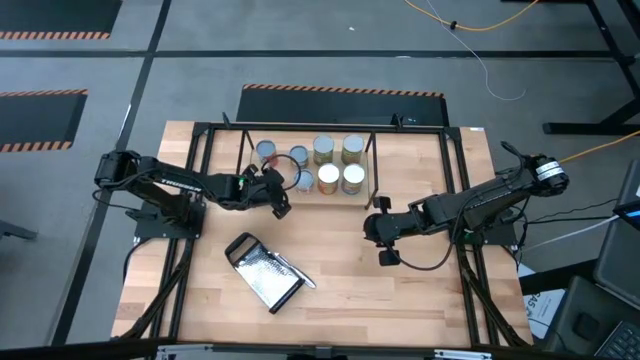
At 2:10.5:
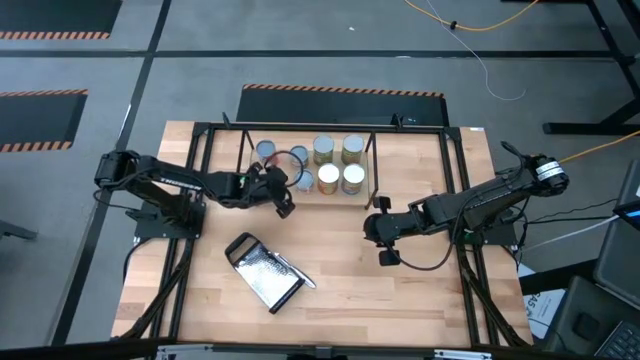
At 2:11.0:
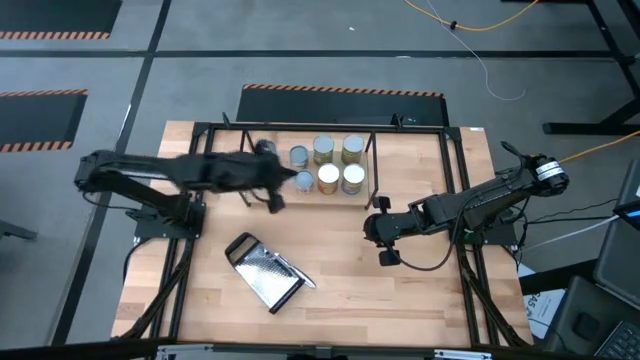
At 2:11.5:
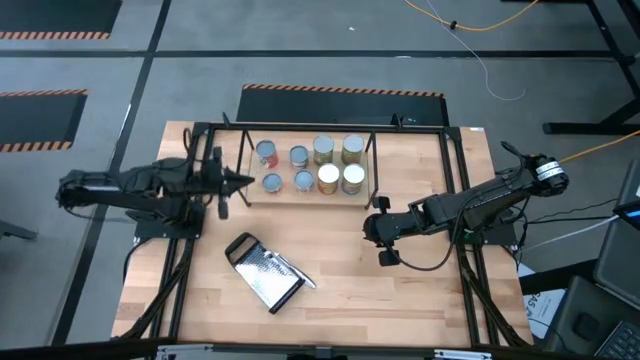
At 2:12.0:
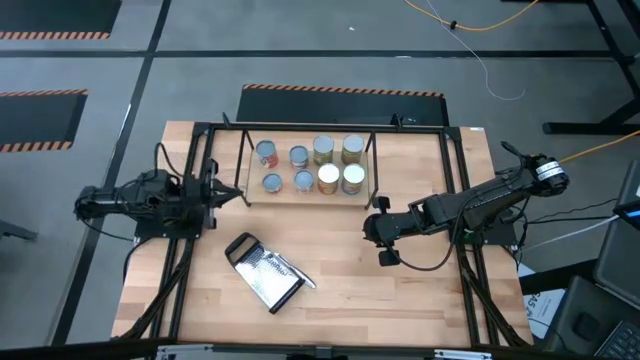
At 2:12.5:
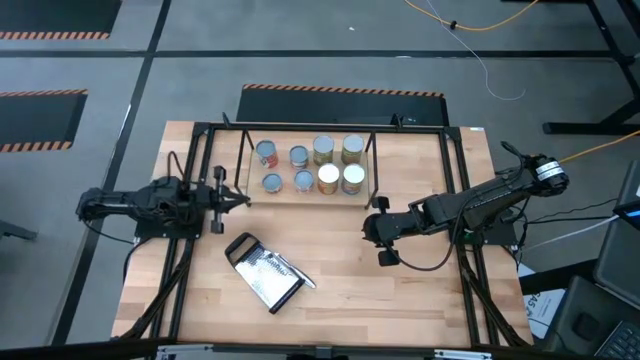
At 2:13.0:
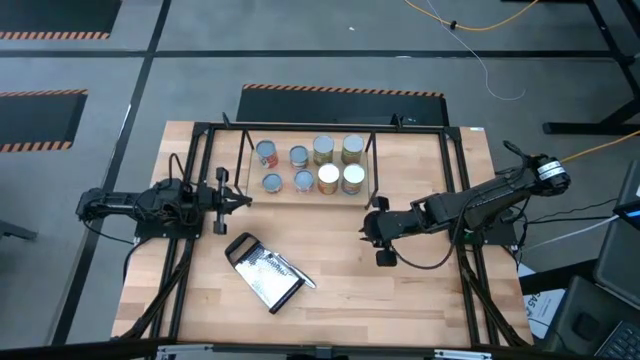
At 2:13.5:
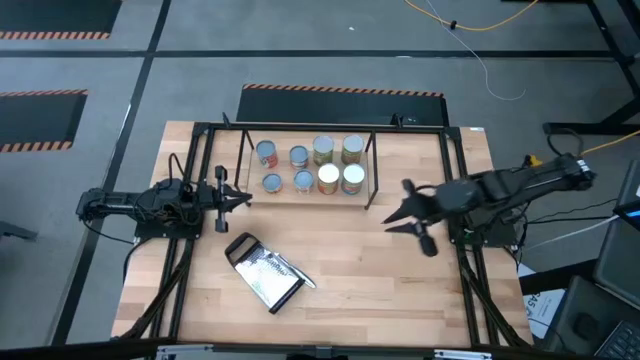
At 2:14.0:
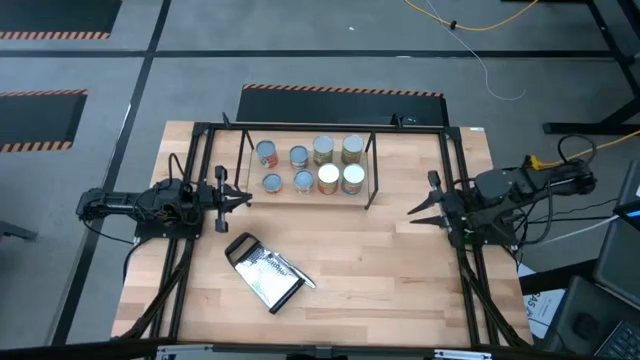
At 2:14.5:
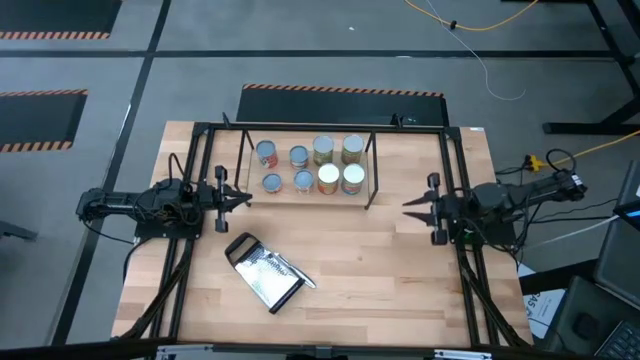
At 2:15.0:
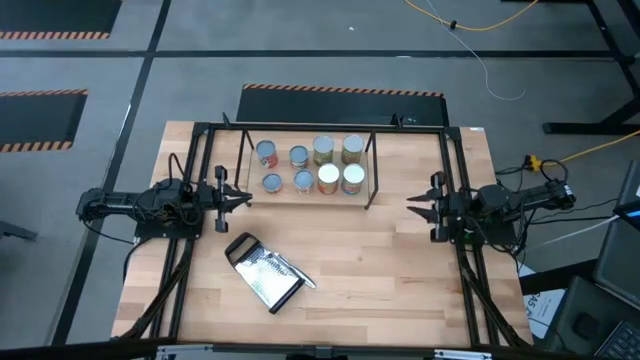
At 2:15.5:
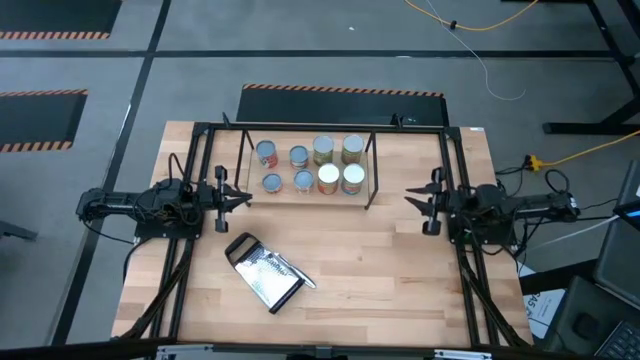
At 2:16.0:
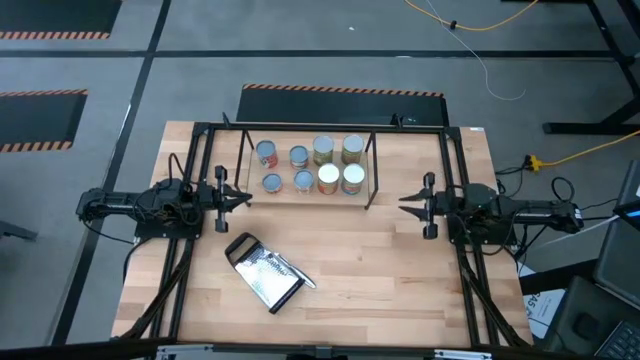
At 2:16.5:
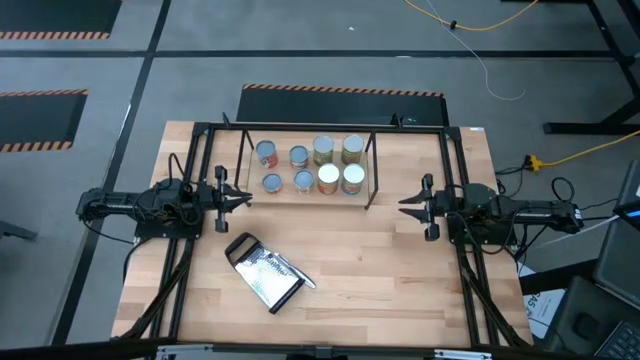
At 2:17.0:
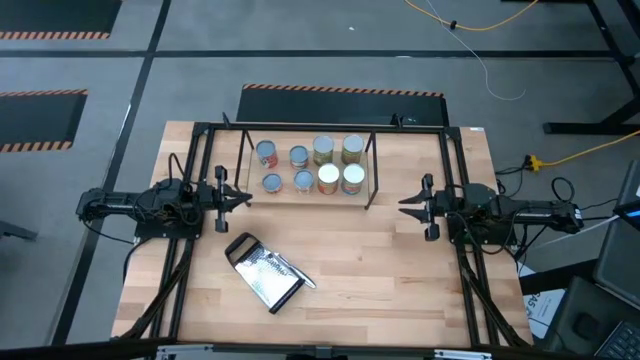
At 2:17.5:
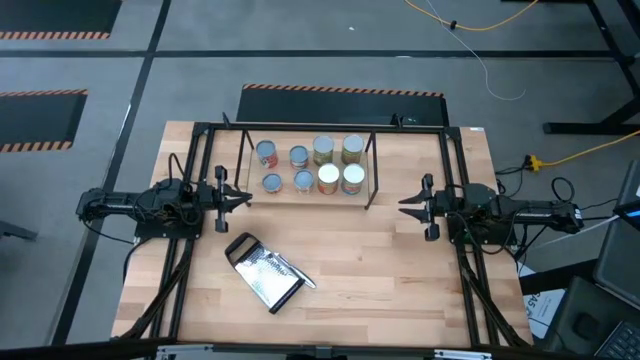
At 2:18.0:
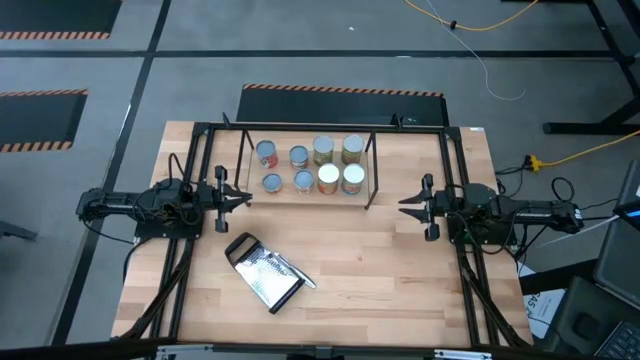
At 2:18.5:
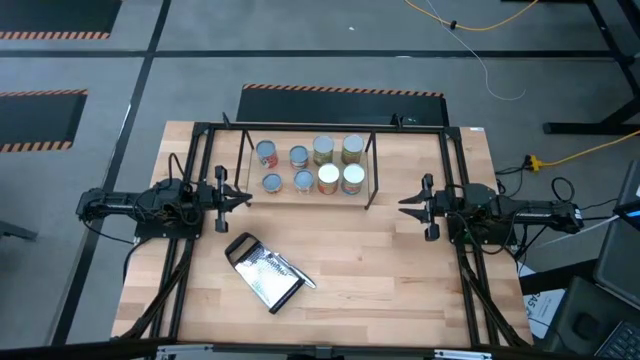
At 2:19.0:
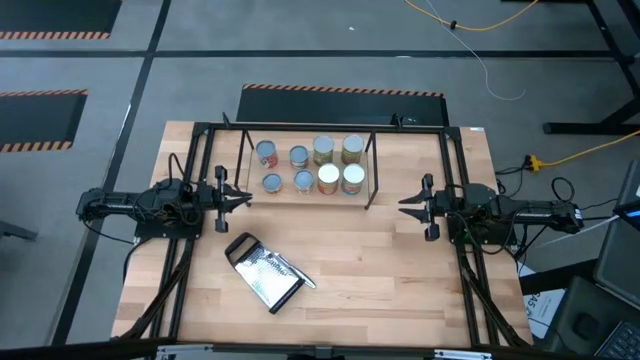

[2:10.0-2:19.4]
Task: Pick and place cans onto a shelf
Return to Home Position

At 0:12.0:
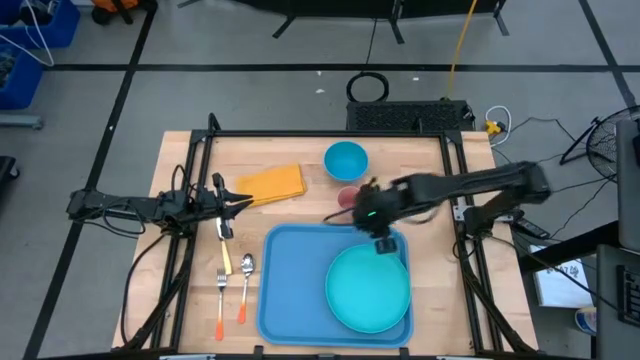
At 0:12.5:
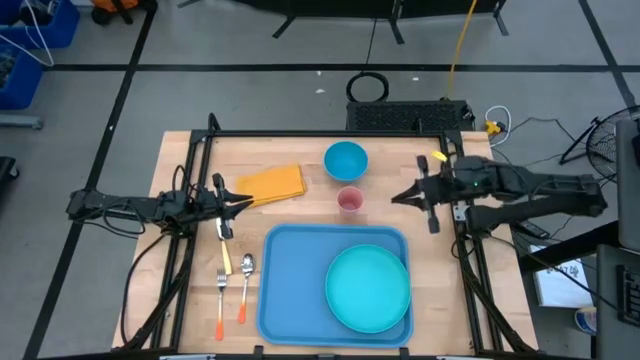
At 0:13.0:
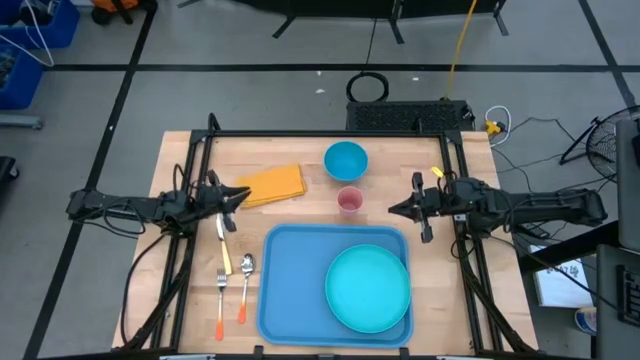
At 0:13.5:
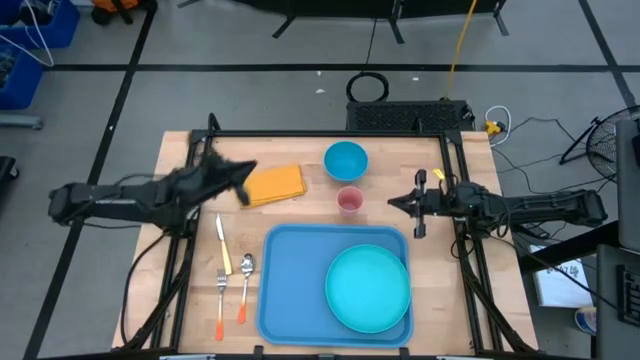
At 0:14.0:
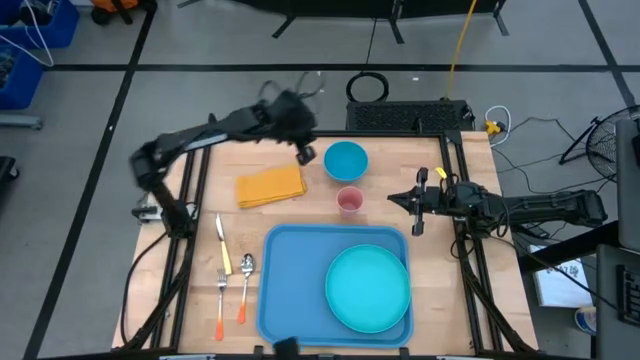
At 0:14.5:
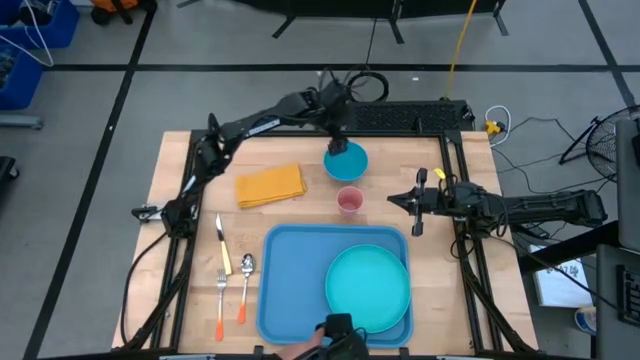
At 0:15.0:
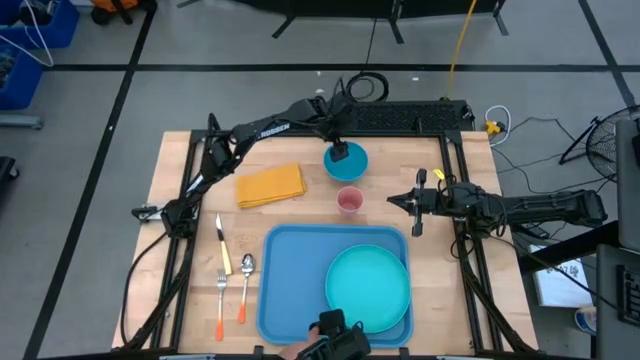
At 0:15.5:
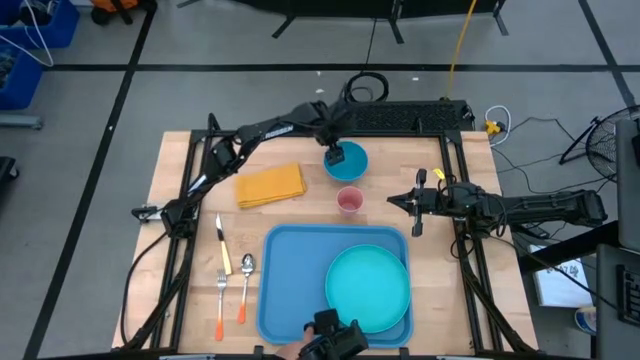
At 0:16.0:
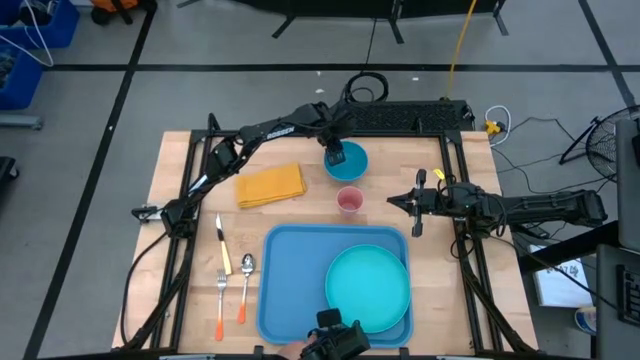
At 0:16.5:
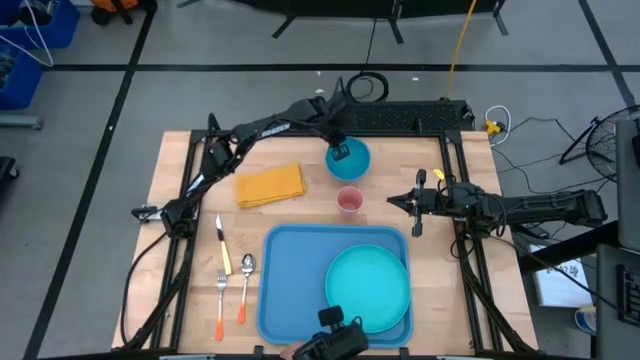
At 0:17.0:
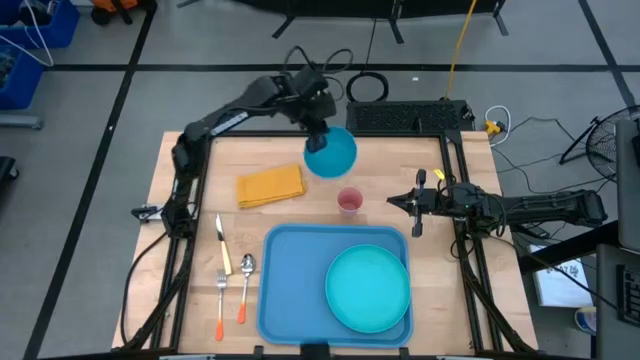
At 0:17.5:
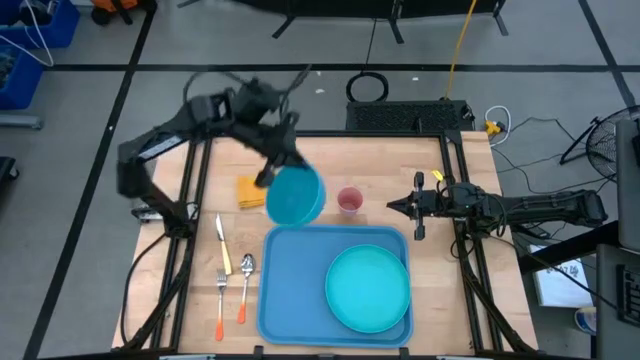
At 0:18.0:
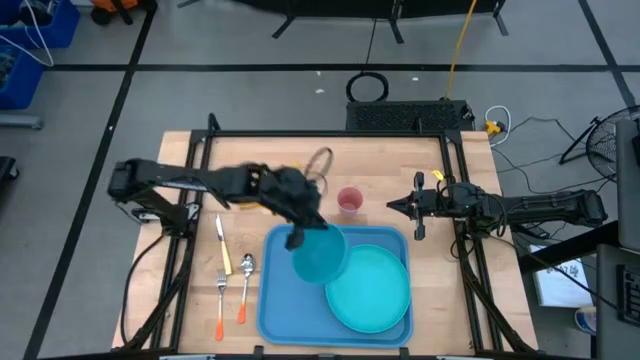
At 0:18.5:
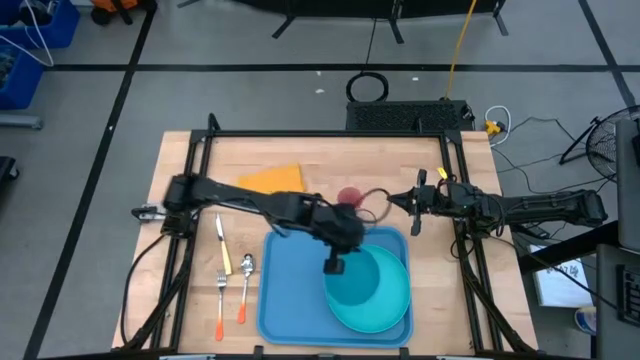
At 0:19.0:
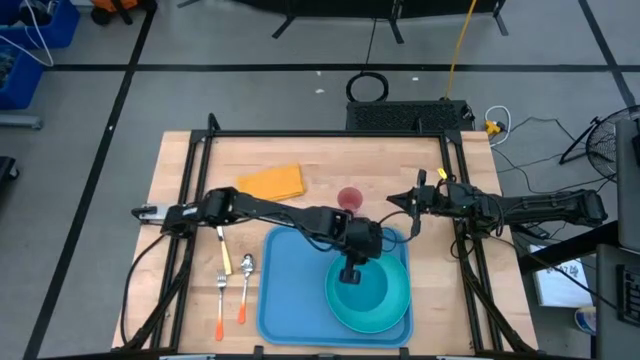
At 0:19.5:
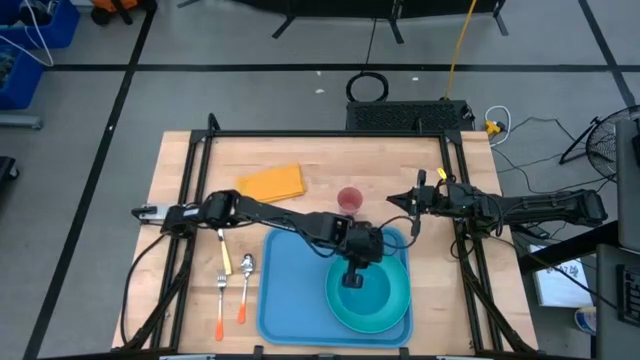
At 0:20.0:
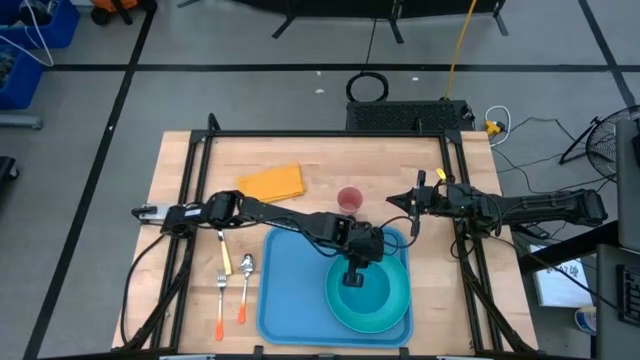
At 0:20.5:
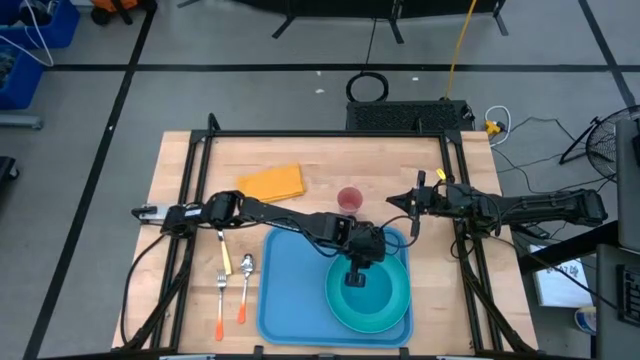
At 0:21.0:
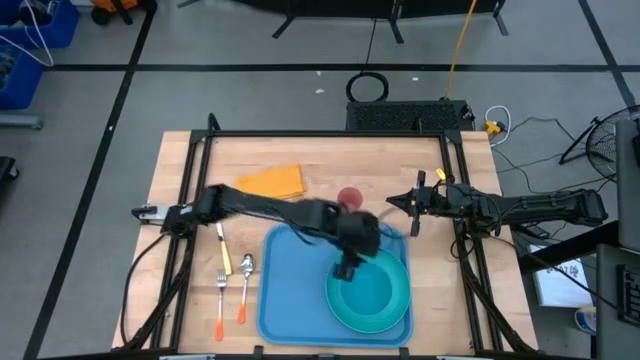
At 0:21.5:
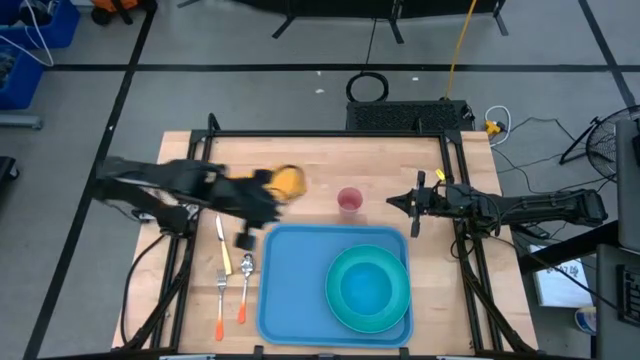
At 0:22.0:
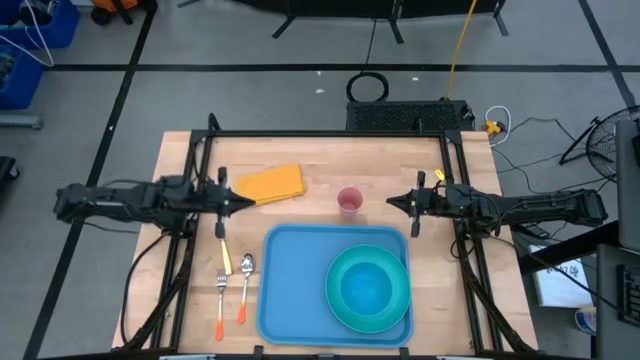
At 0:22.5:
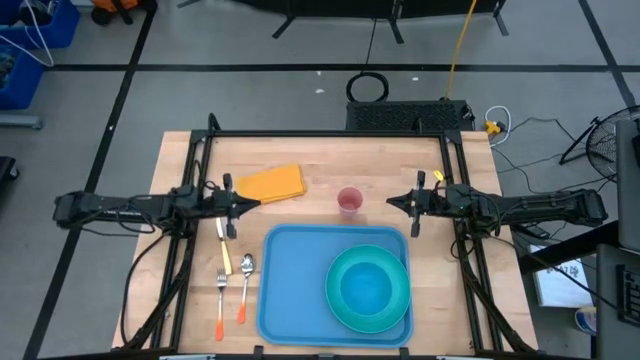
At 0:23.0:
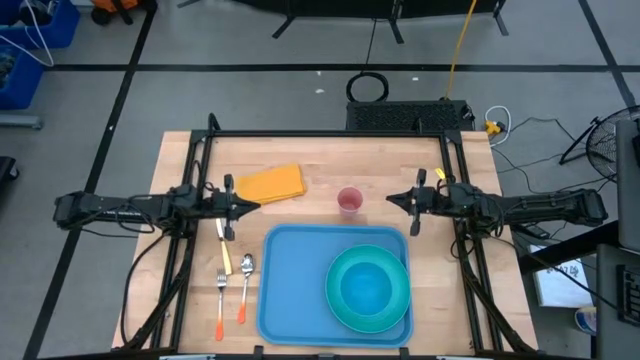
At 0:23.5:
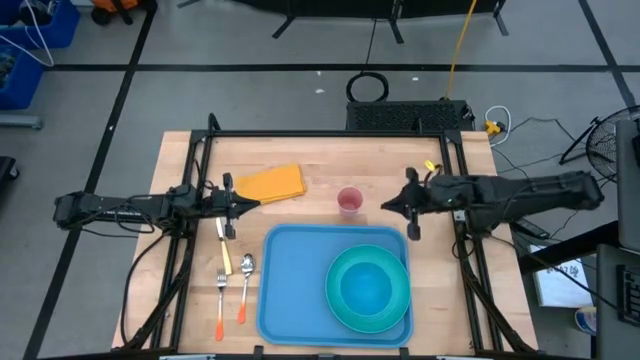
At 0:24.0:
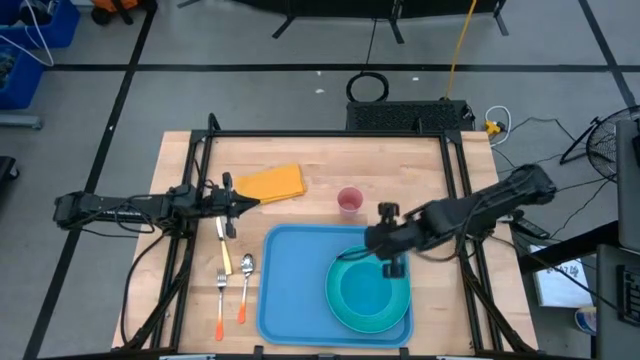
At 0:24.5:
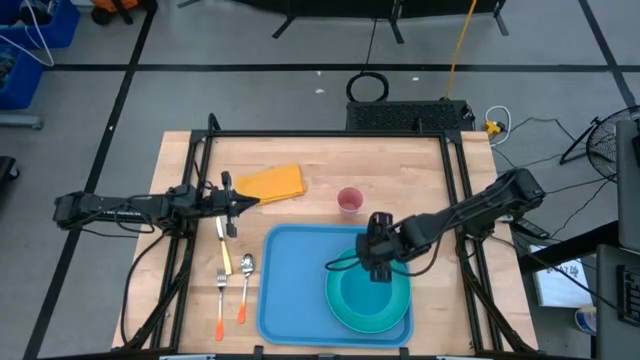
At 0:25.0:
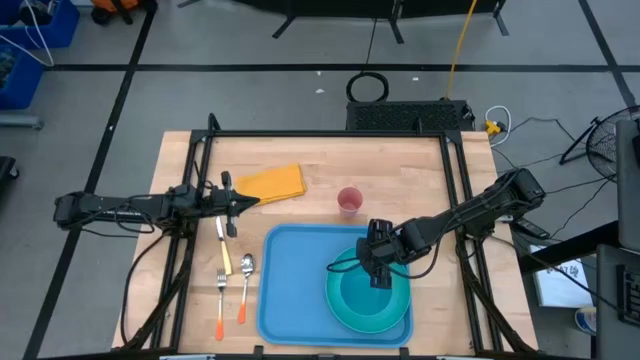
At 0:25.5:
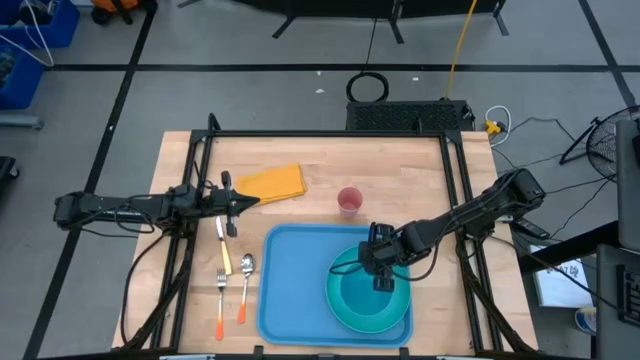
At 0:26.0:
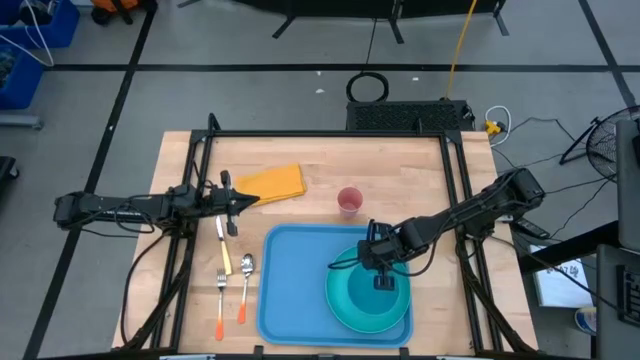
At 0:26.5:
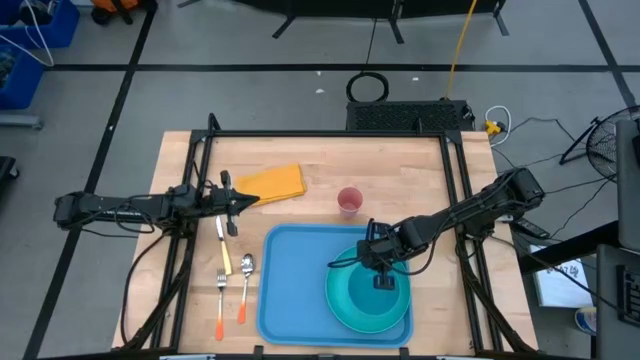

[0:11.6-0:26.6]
Task: Set up tray
Put the blue bowl on top of the plate on the tray
